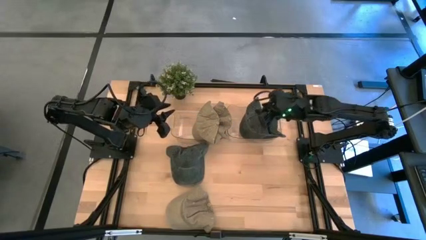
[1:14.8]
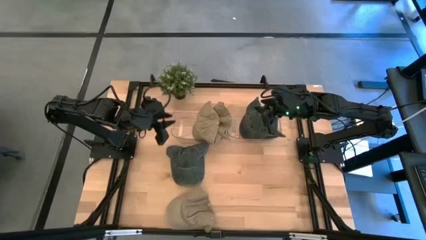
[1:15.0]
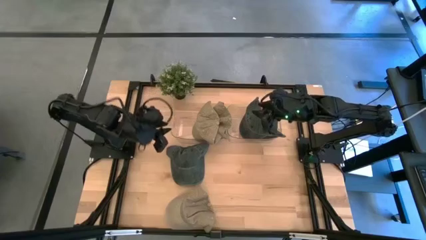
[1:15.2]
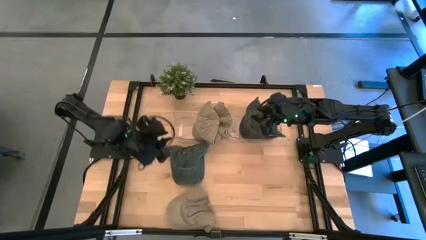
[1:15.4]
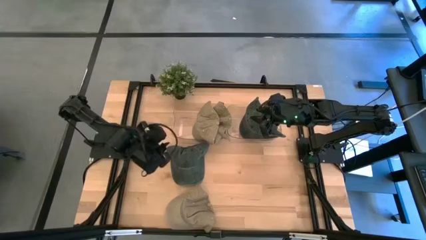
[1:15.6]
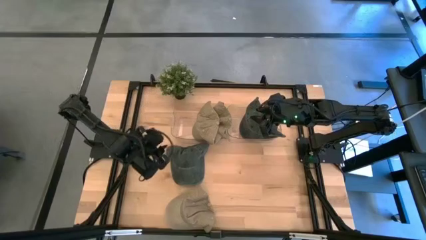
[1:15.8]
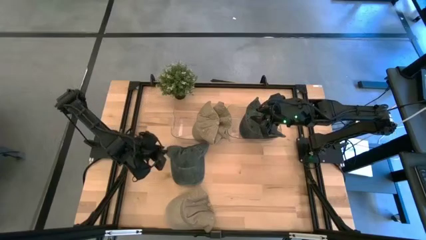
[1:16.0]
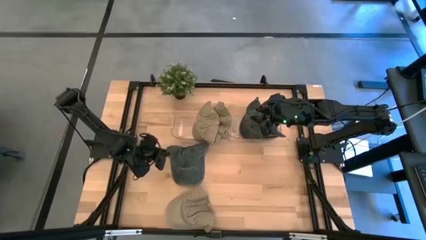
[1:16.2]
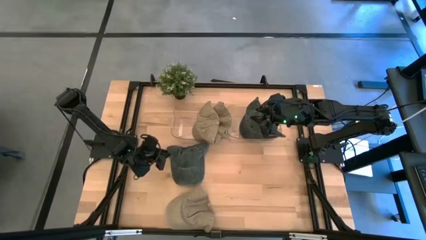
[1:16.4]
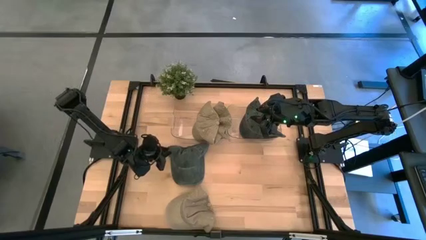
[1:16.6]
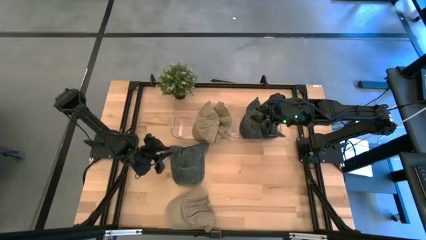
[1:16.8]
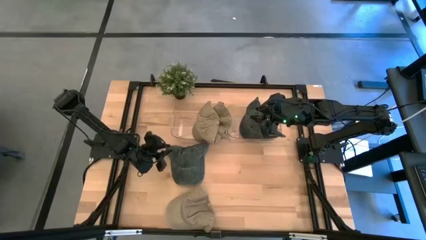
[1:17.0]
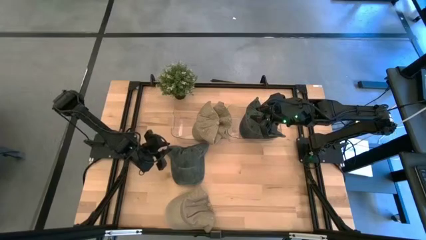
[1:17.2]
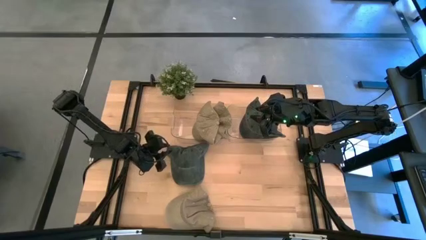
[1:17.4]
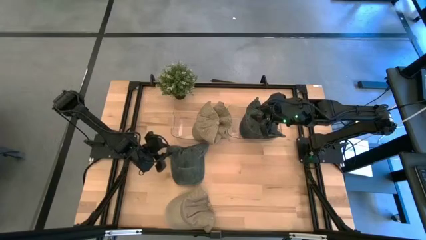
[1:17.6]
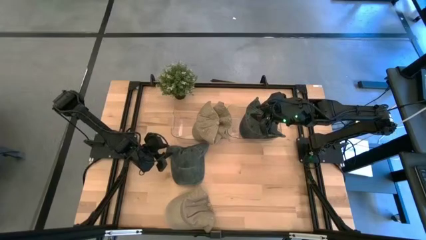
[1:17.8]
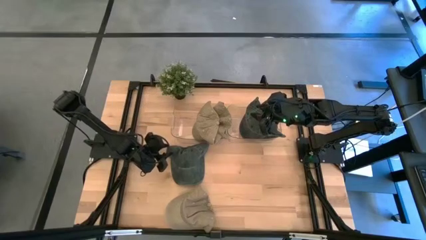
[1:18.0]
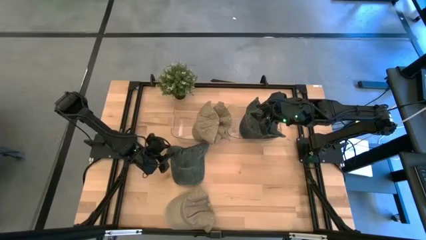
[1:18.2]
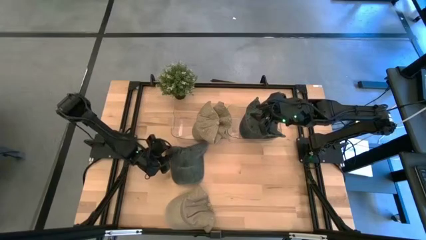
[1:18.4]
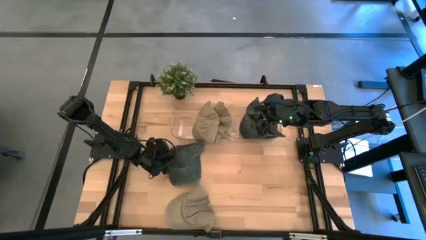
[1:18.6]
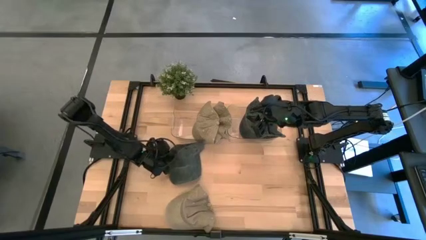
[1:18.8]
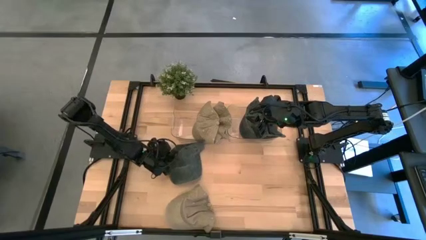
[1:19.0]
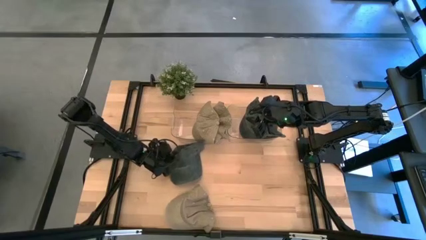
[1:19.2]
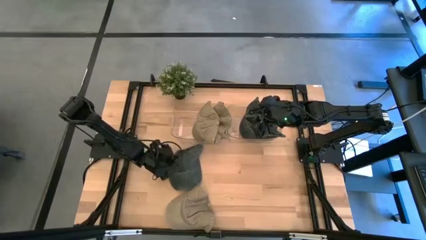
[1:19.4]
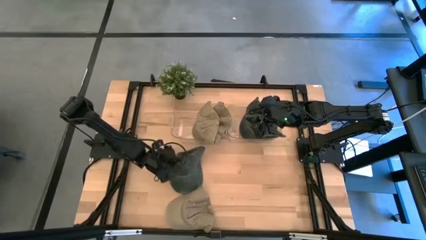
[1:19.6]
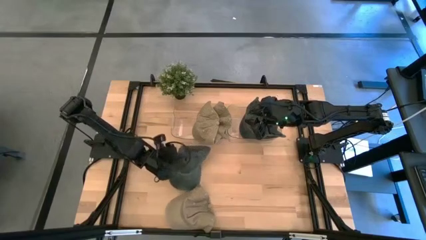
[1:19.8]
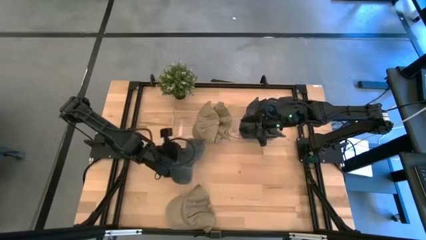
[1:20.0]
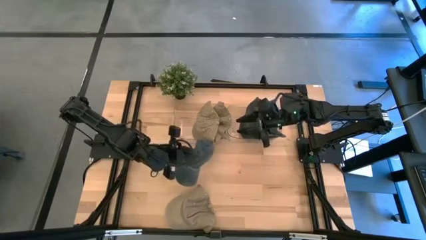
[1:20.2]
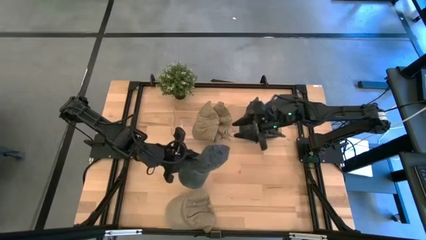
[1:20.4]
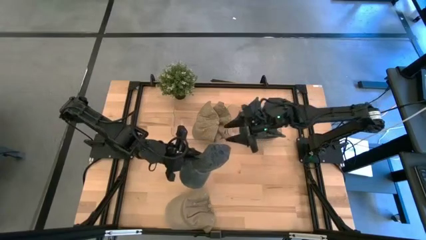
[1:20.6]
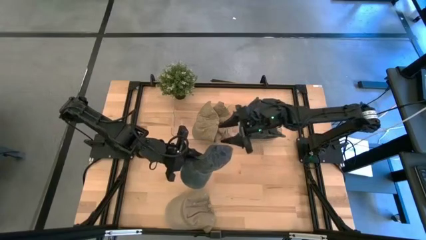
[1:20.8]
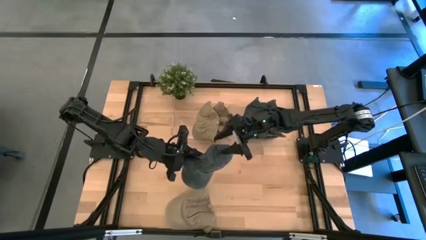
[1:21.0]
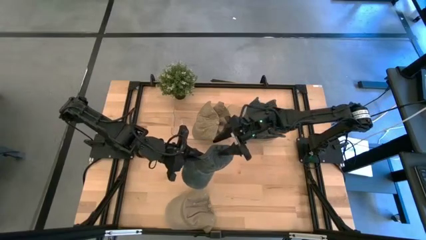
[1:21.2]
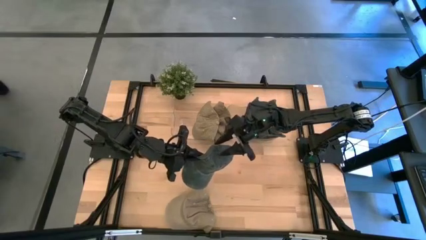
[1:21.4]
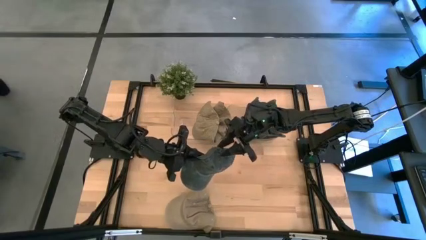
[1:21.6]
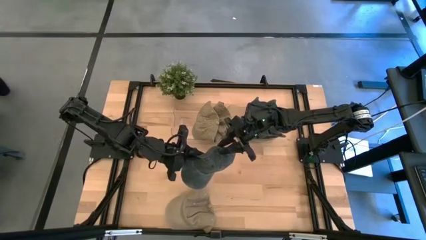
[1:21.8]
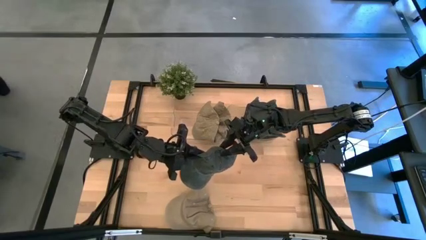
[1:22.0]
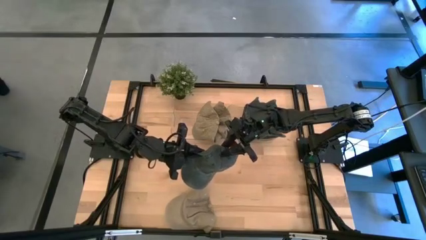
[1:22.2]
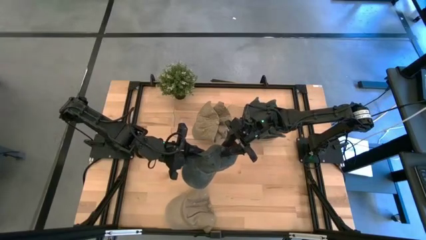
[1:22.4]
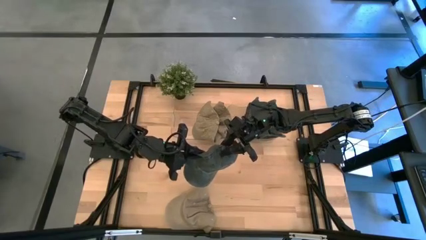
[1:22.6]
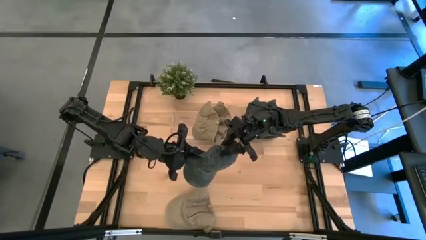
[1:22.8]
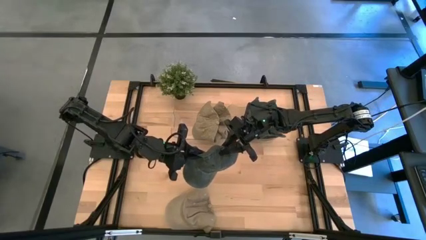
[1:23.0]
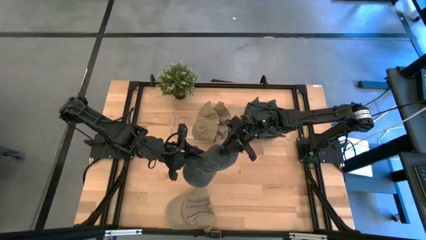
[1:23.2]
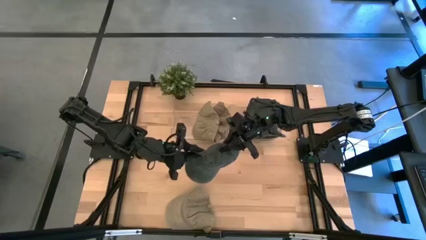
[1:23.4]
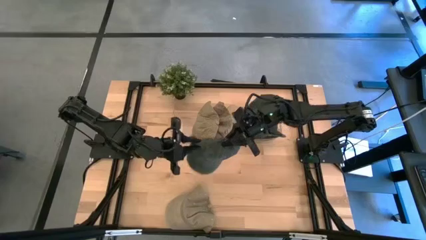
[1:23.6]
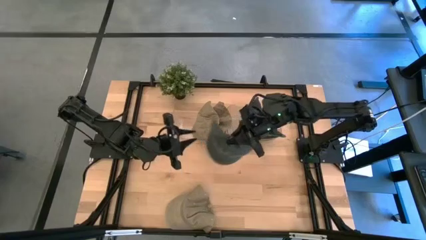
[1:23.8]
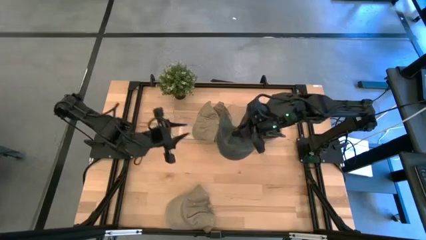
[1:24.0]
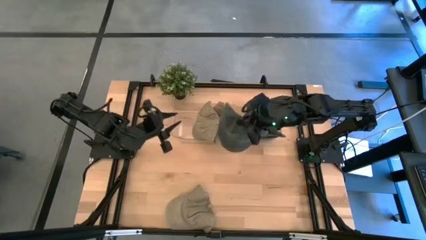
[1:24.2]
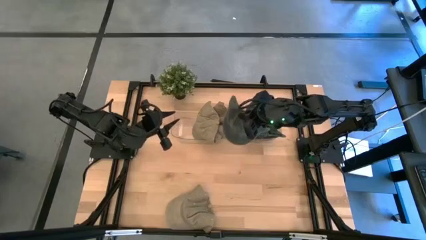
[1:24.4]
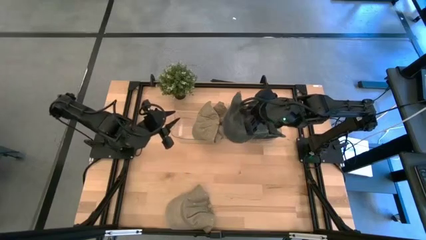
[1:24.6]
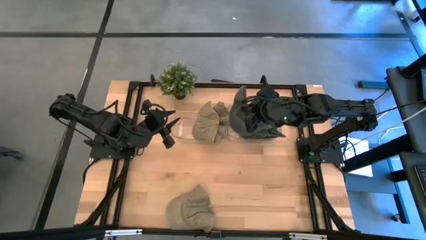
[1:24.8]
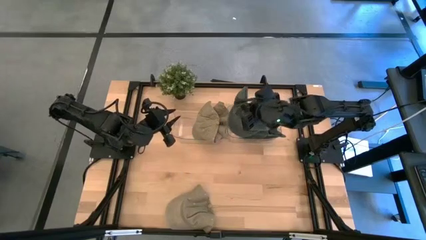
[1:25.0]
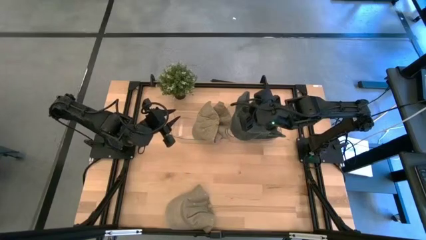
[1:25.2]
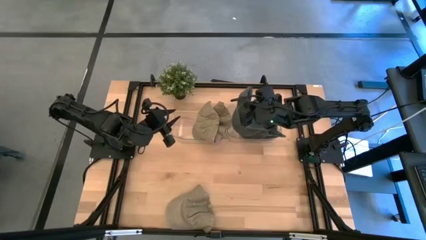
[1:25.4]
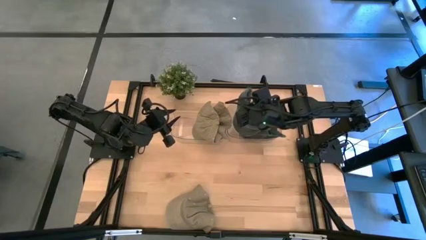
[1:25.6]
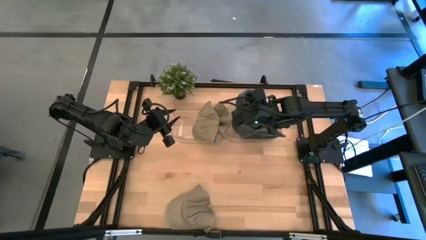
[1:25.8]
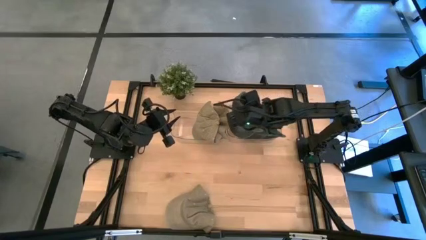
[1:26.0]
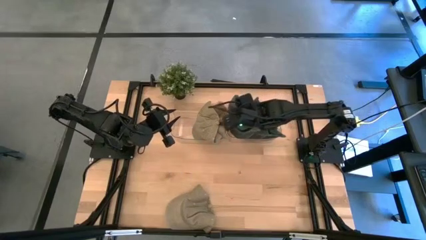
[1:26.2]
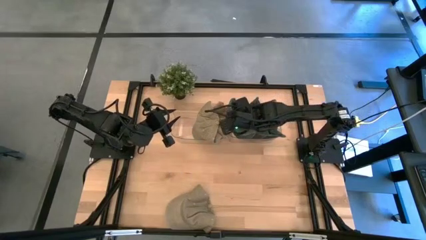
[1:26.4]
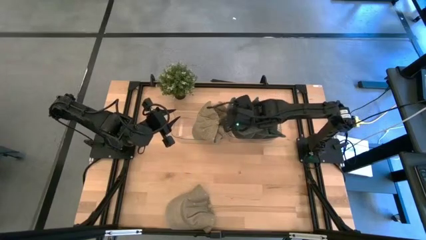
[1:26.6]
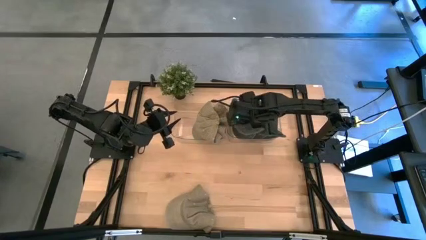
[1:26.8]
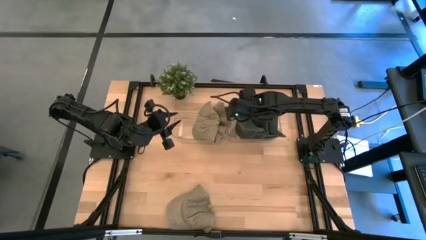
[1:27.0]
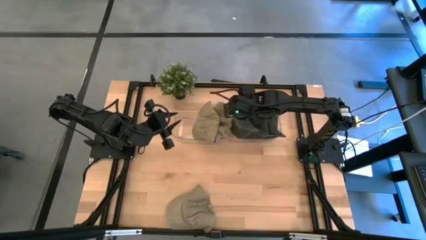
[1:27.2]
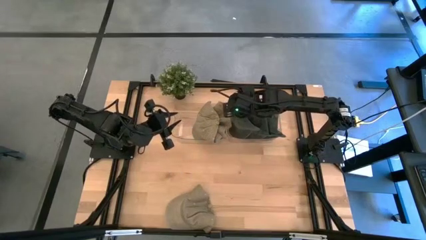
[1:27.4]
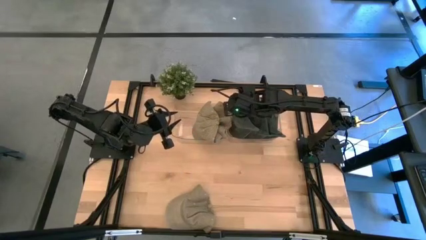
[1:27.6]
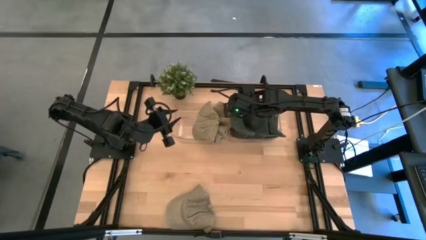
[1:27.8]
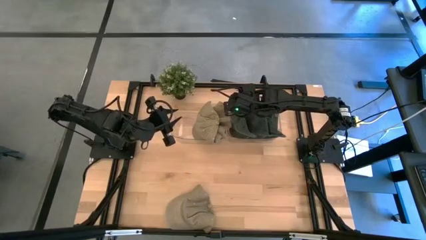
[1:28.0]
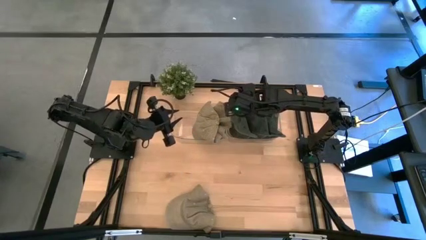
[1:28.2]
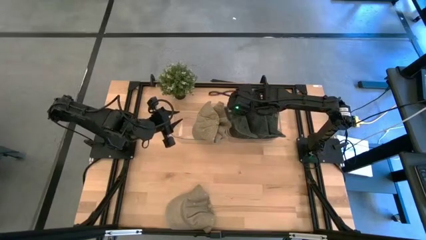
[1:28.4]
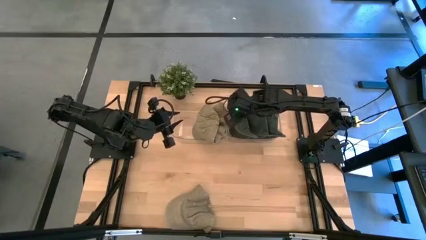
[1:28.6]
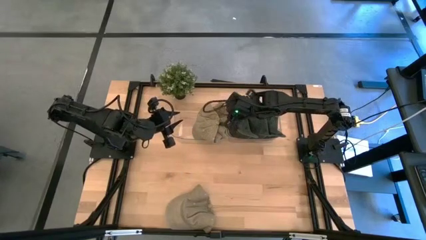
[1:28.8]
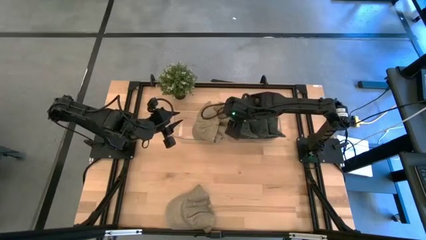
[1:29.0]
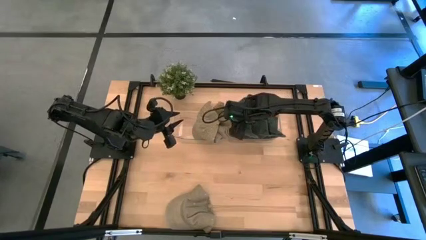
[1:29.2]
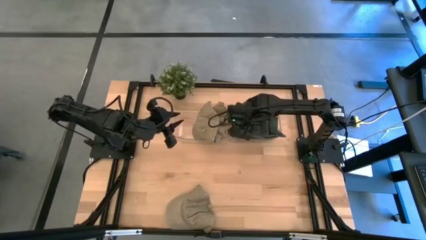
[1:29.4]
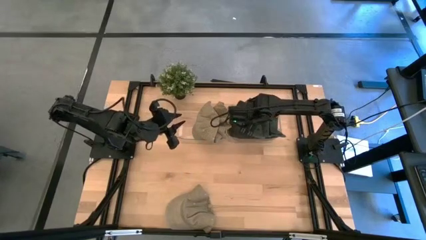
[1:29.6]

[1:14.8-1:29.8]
Task: Pick & Place hat
Put the black cap into the right transparent bin
